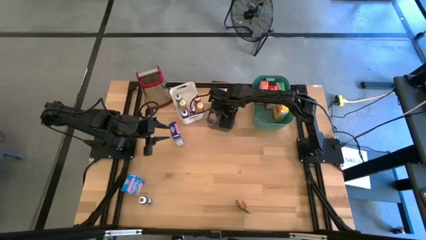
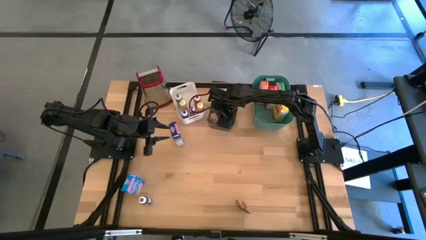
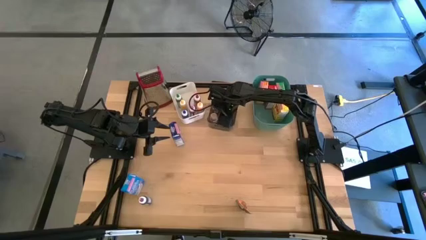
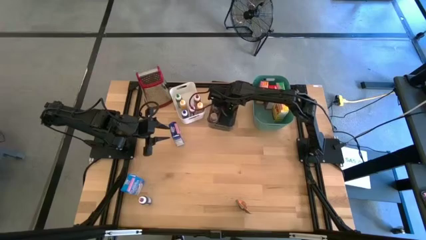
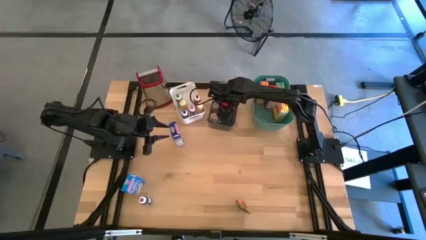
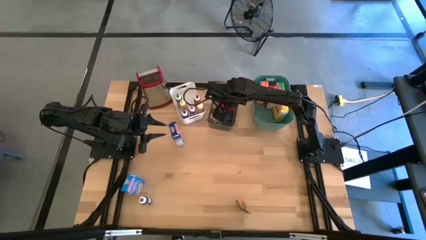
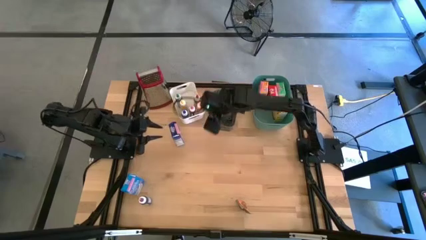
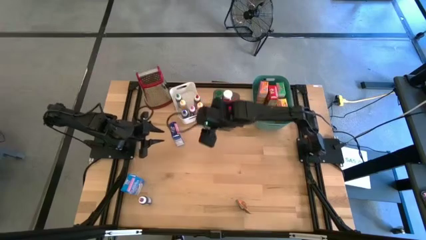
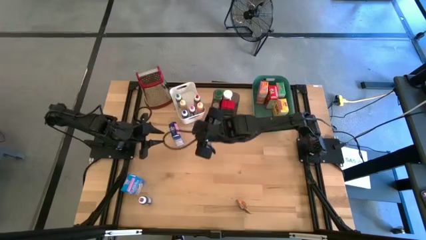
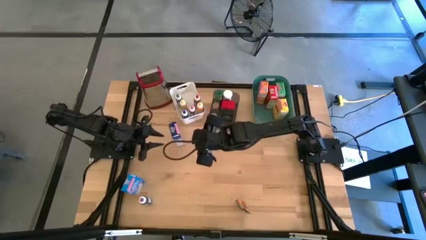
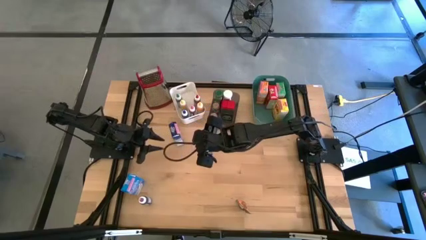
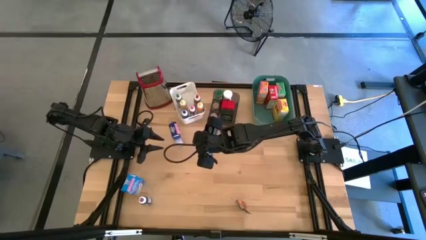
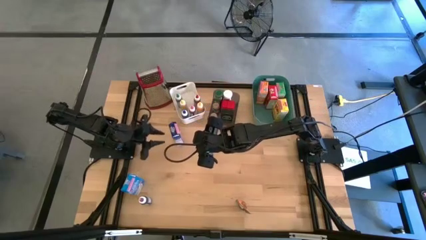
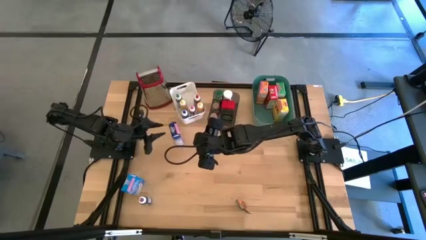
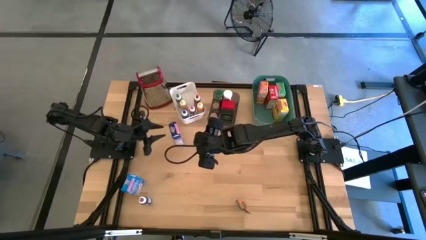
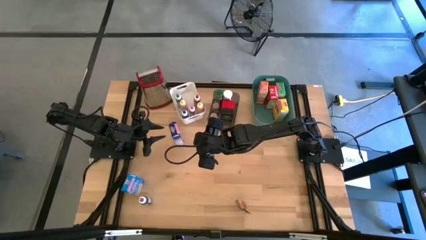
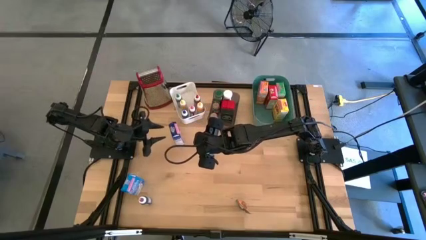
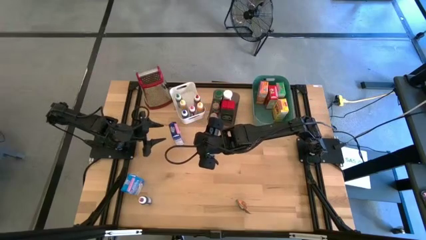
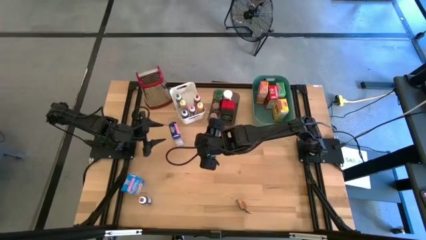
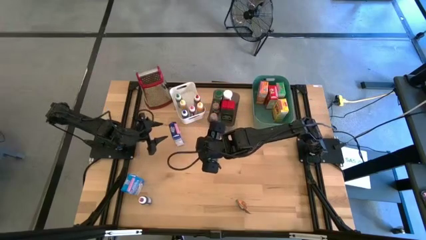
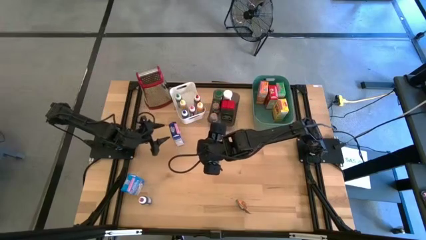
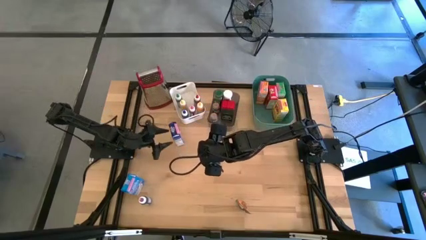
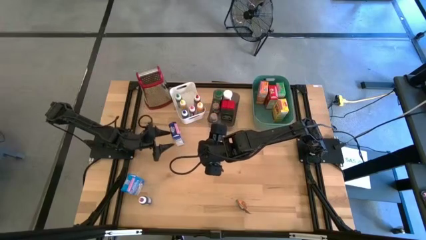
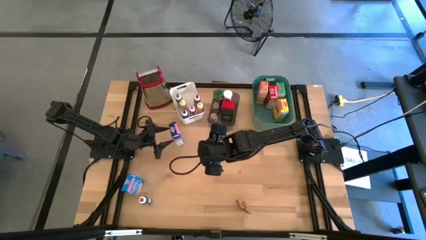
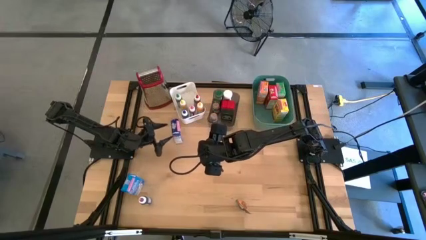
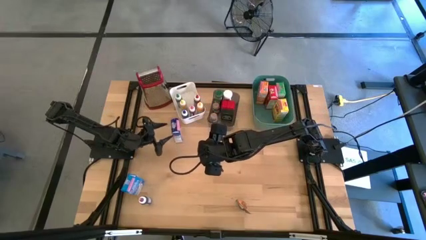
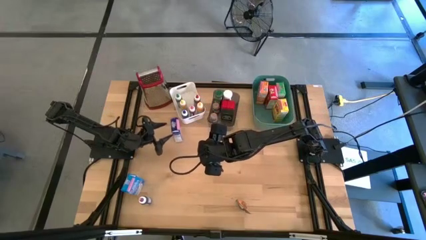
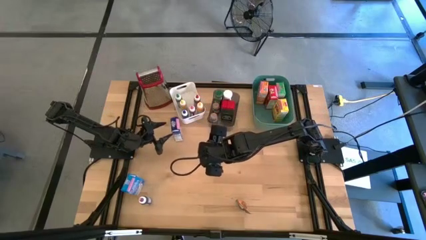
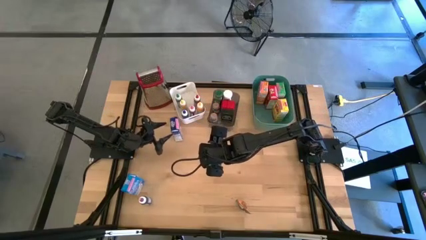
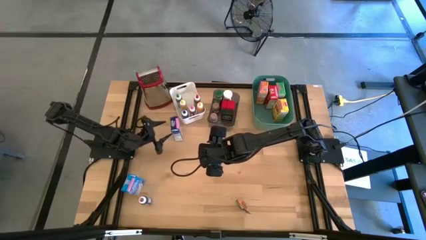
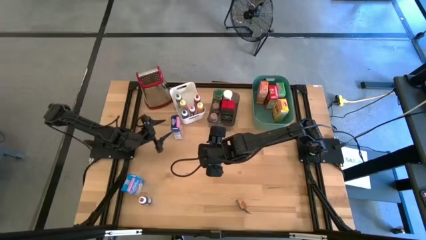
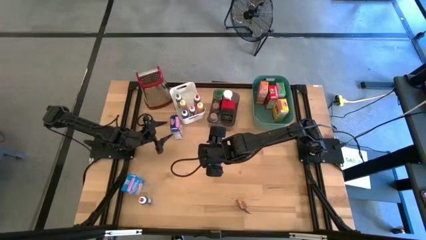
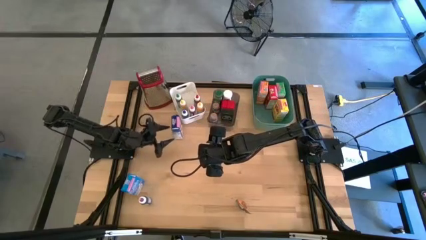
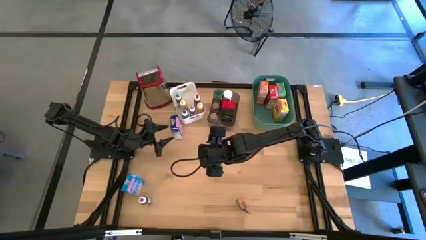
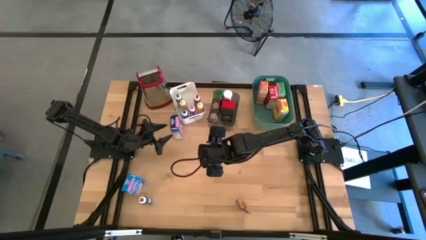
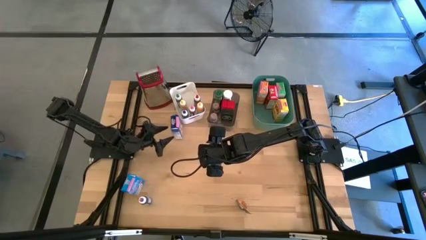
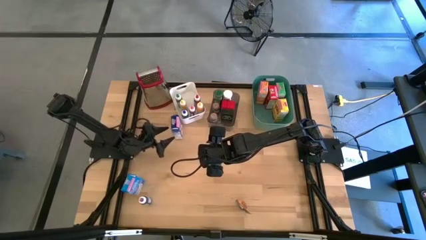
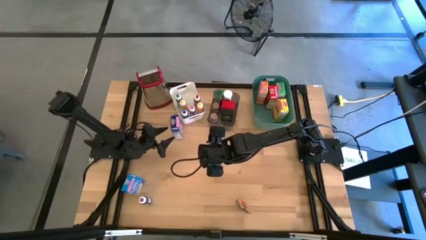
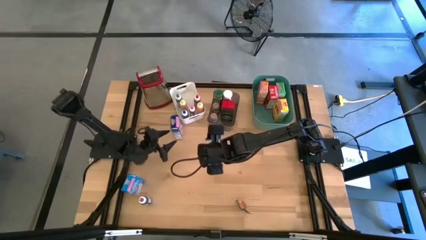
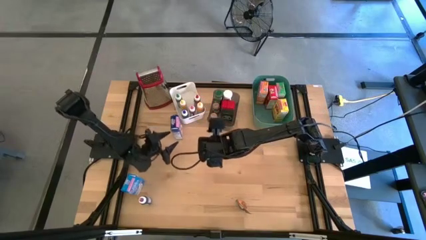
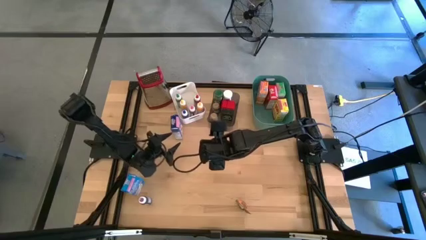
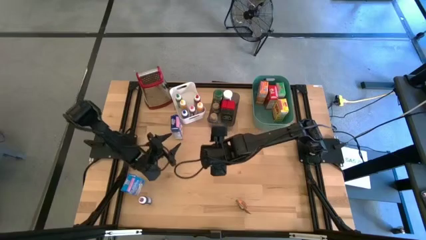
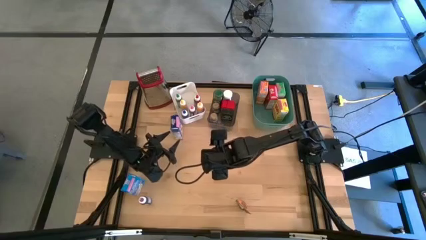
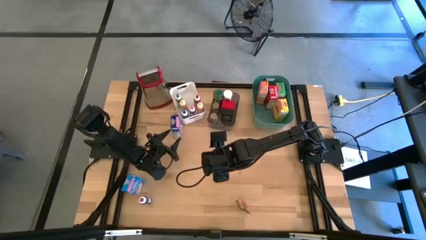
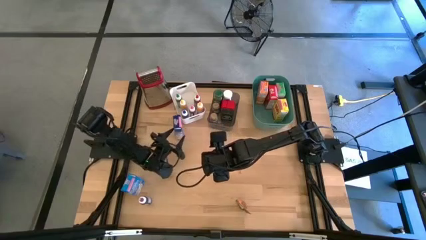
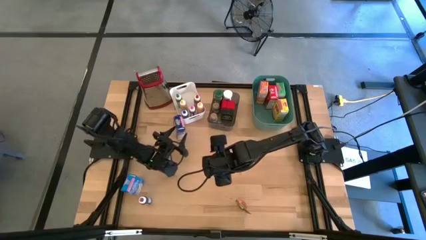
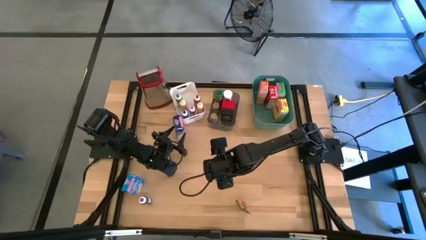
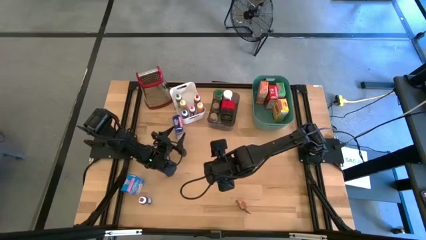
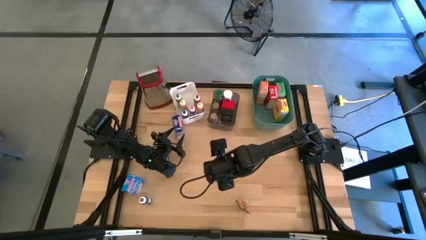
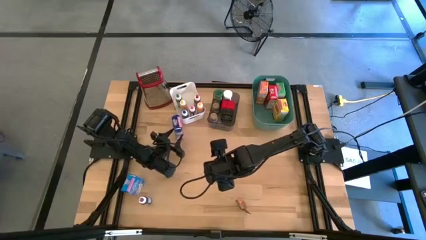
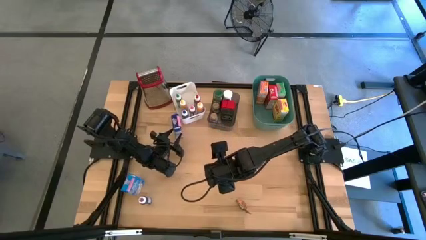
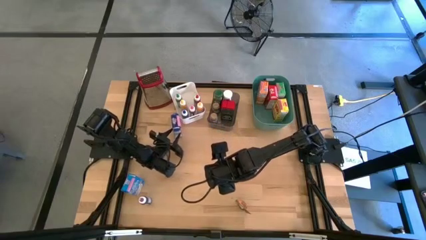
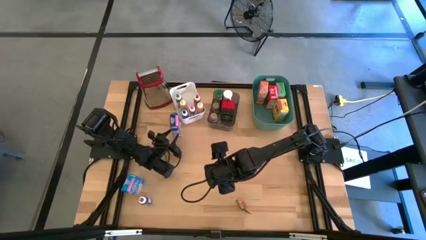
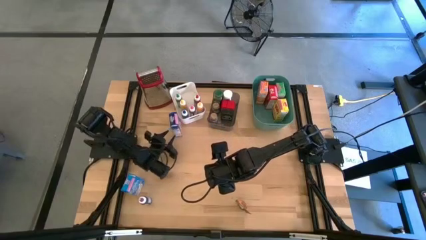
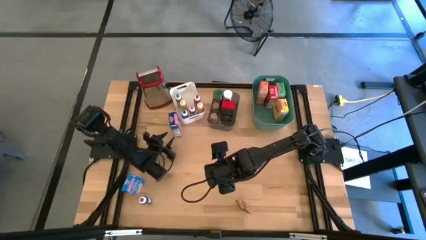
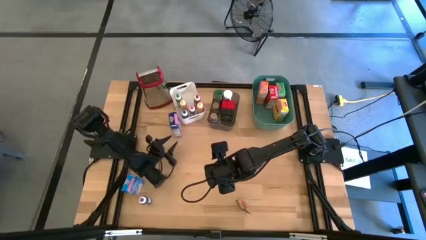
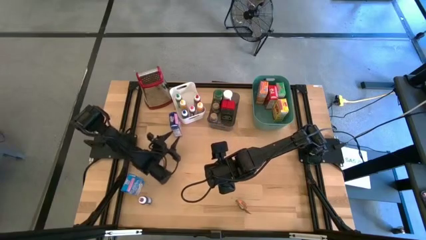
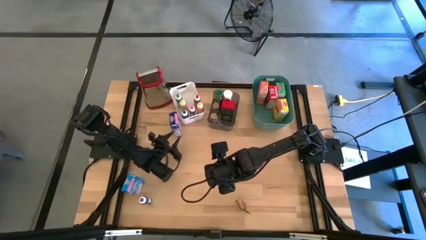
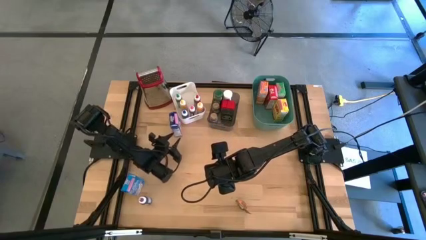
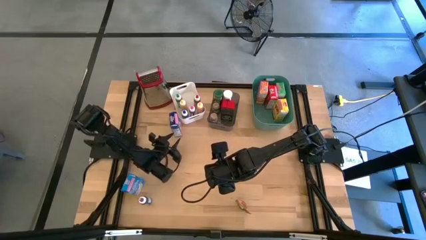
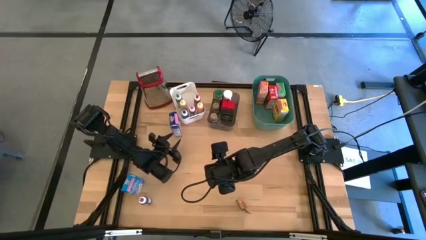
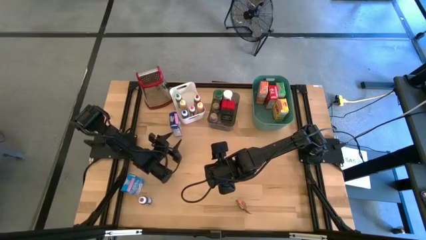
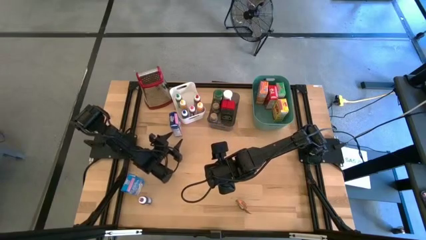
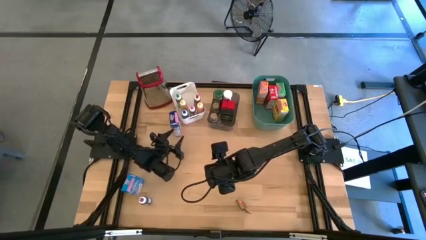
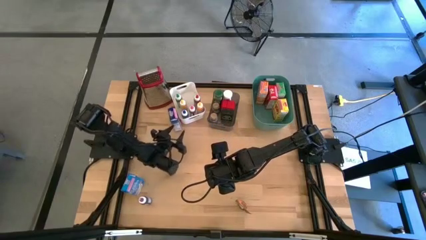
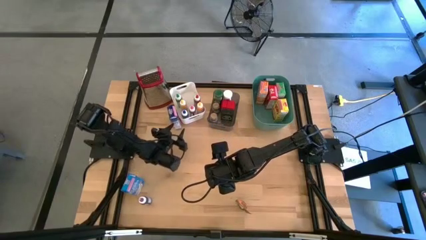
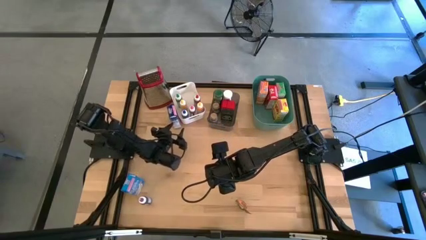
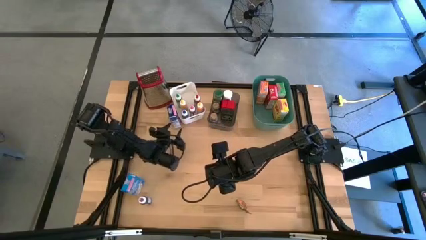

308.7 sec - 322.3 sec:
Task: Pick & Place Kitchen Items
Put the blue cereal box into the green bin

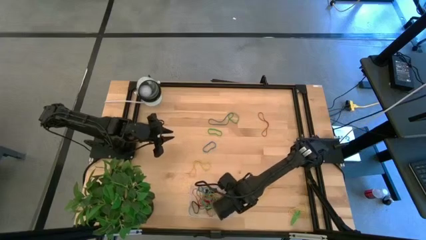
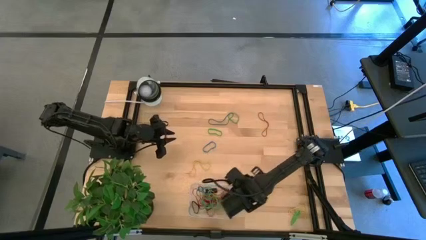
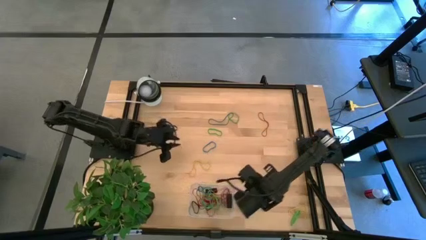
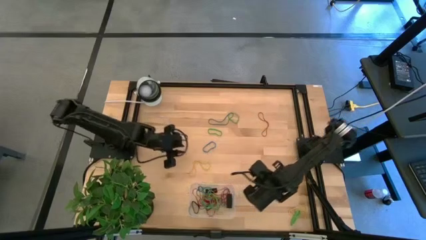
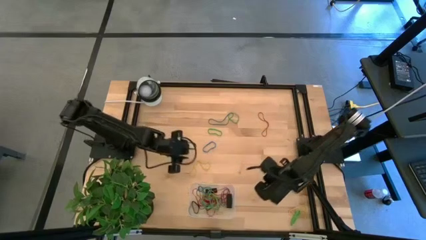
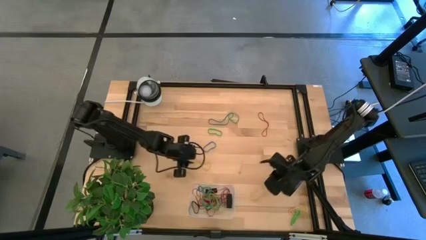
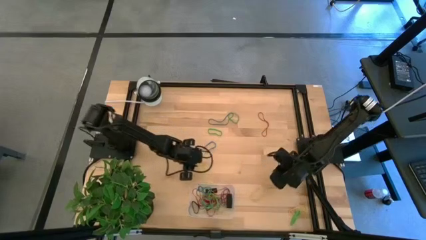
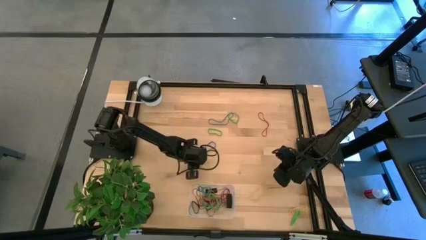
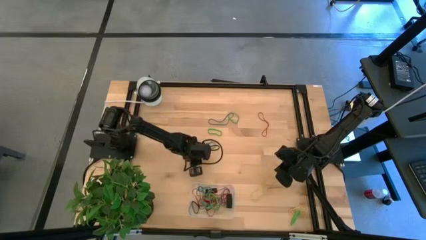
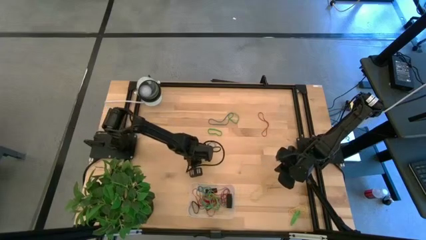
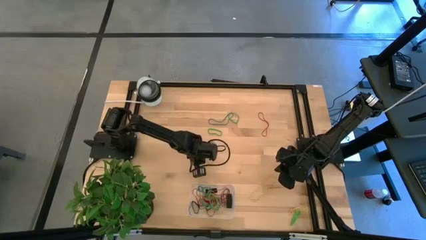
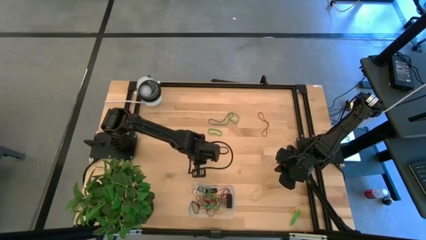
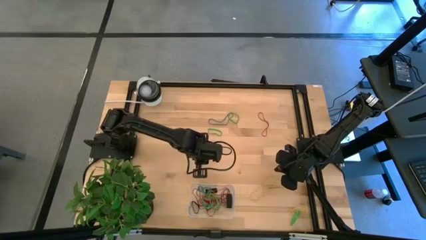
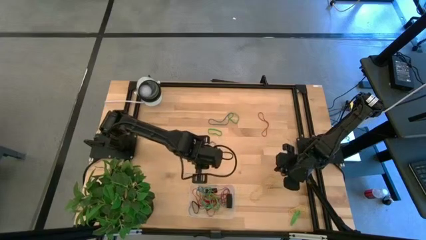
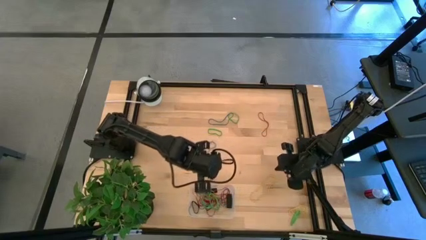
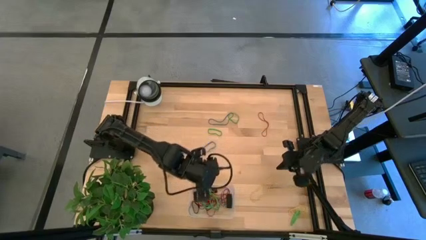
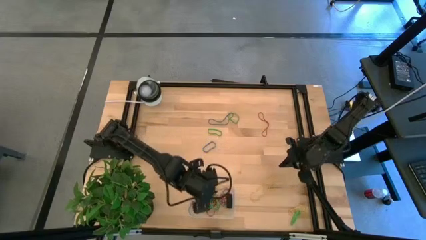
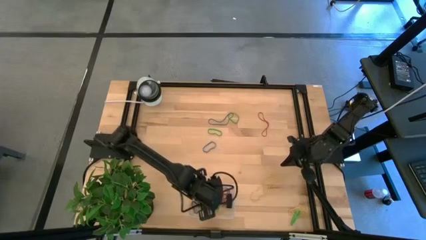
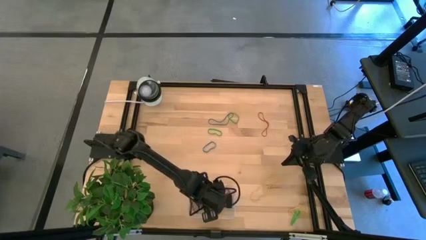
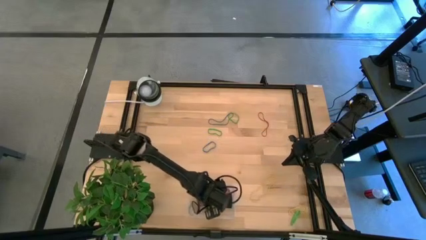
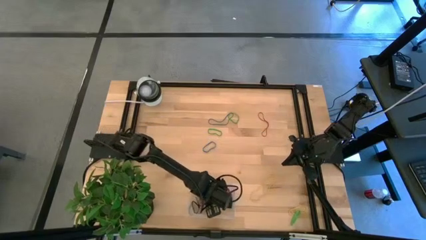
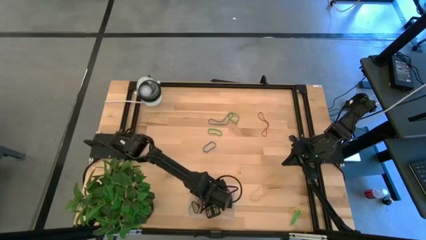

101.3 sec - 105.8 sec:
Task: Pick and place rubber bands into bin
Put the yellow rubber band into the transparent bin
